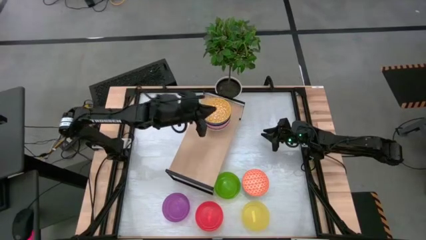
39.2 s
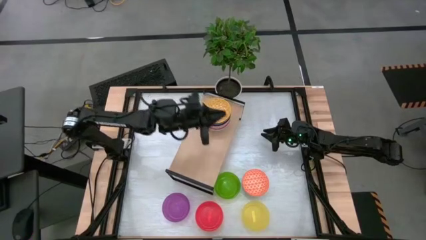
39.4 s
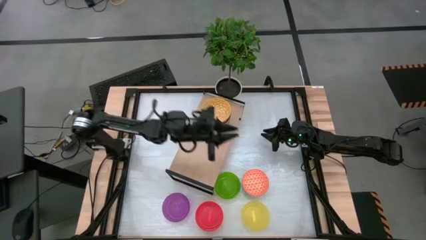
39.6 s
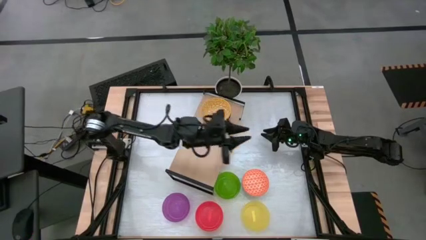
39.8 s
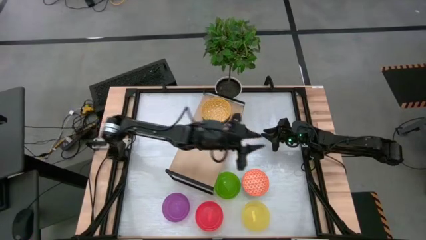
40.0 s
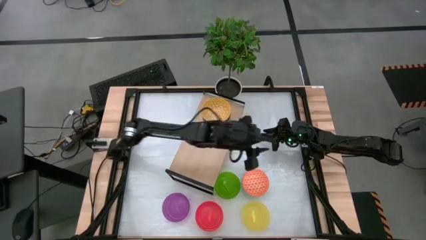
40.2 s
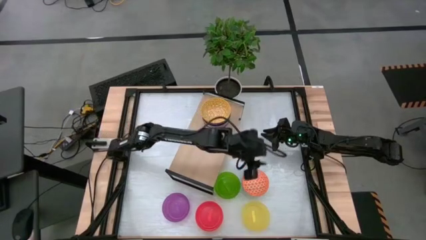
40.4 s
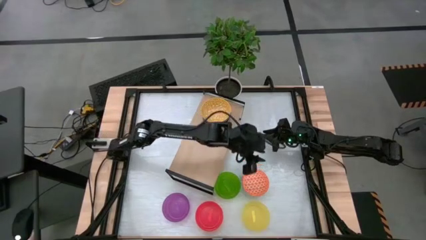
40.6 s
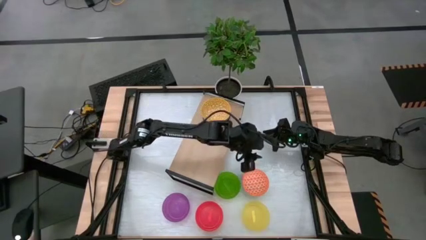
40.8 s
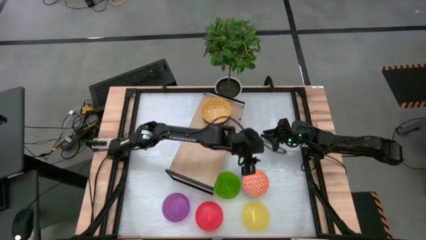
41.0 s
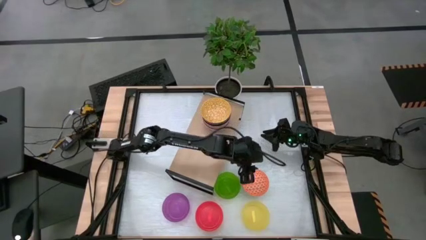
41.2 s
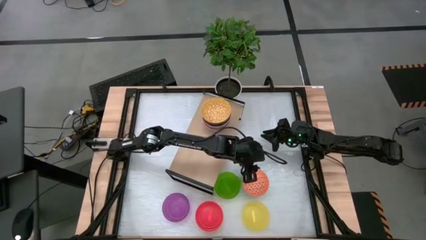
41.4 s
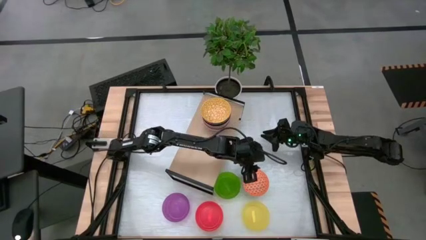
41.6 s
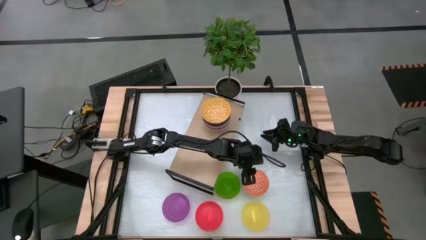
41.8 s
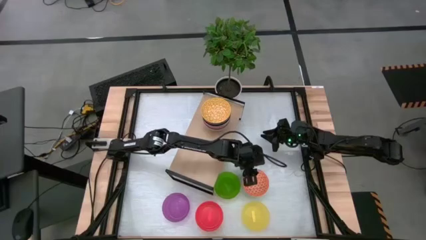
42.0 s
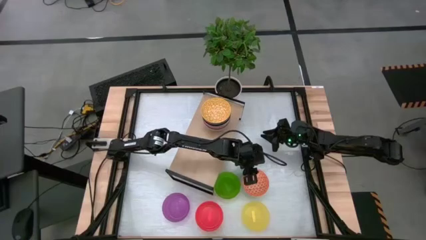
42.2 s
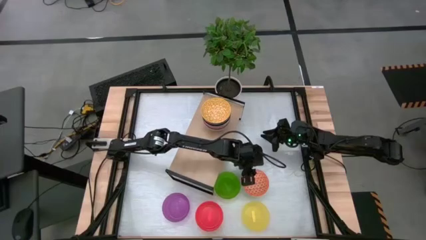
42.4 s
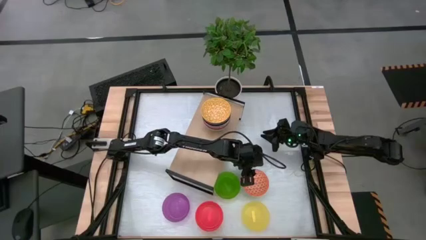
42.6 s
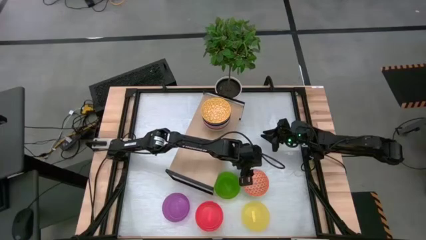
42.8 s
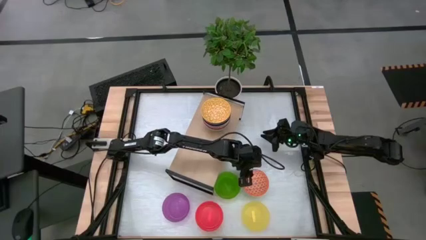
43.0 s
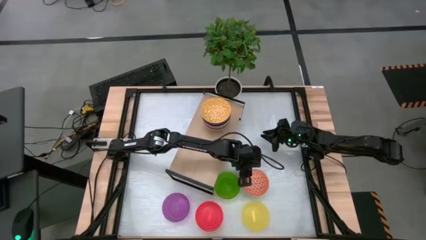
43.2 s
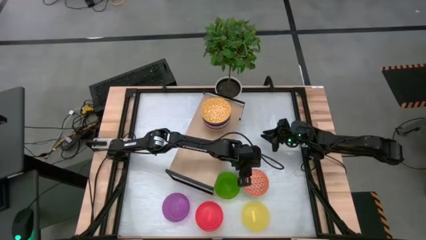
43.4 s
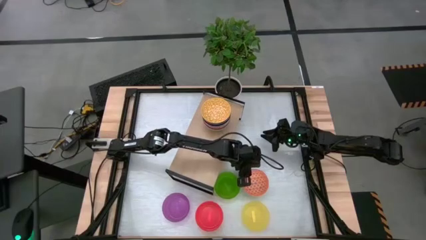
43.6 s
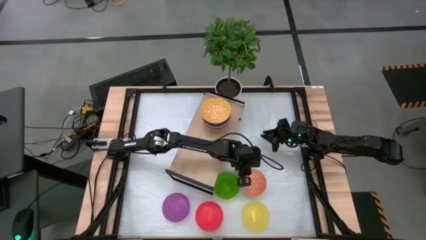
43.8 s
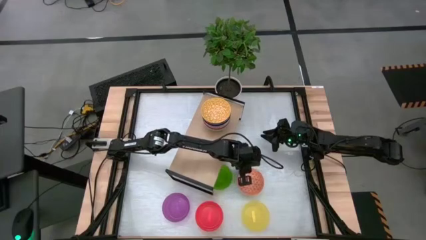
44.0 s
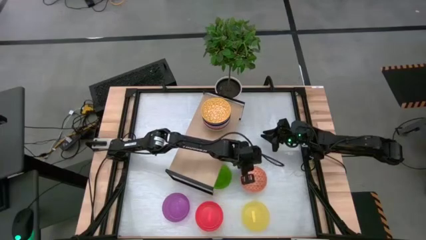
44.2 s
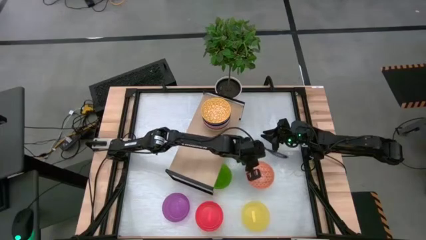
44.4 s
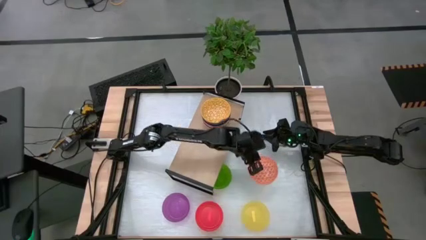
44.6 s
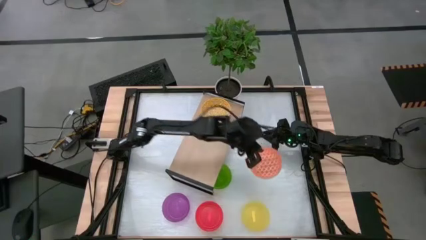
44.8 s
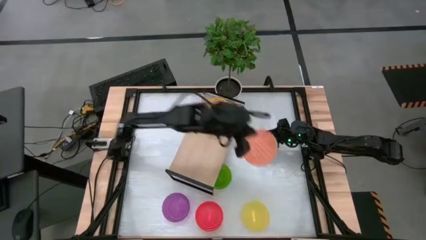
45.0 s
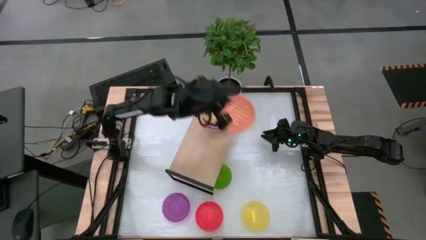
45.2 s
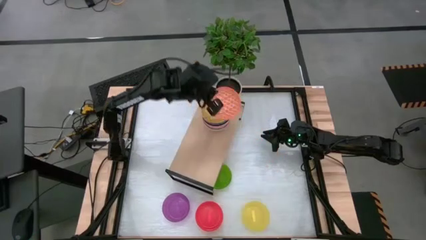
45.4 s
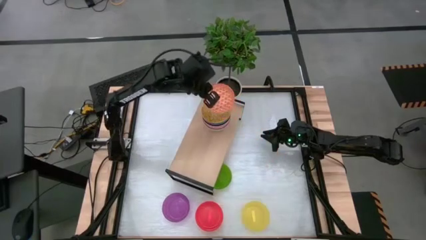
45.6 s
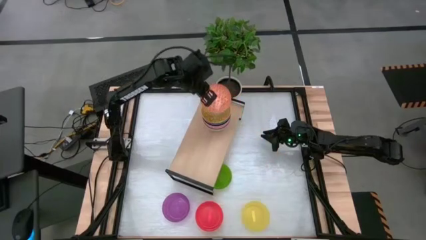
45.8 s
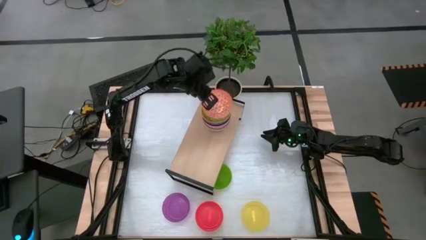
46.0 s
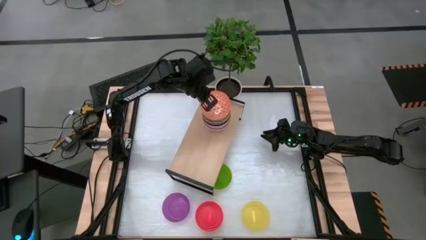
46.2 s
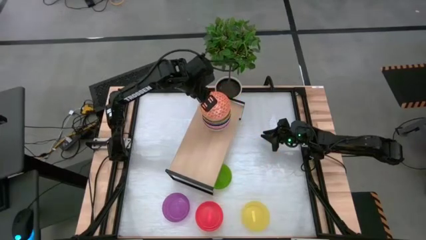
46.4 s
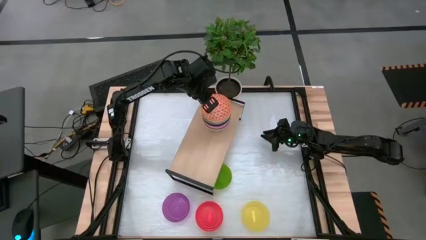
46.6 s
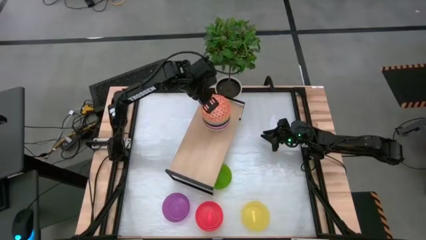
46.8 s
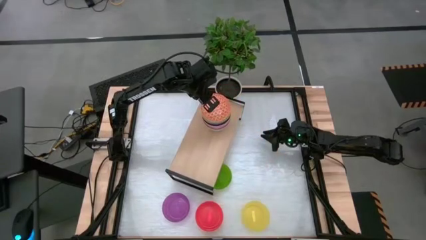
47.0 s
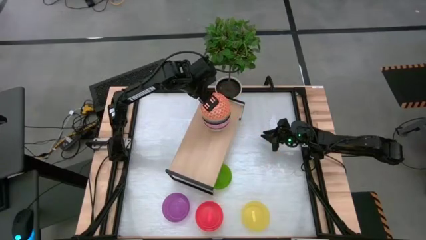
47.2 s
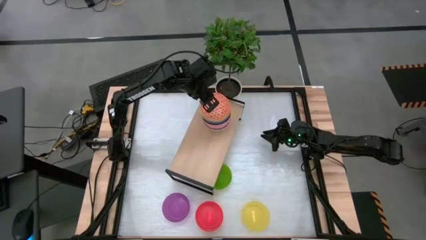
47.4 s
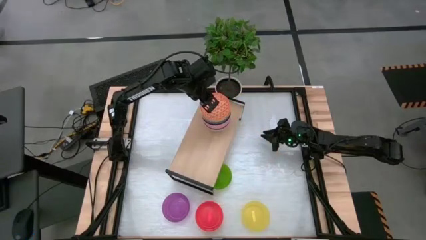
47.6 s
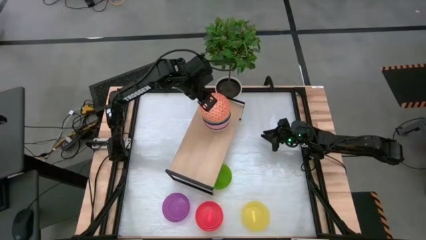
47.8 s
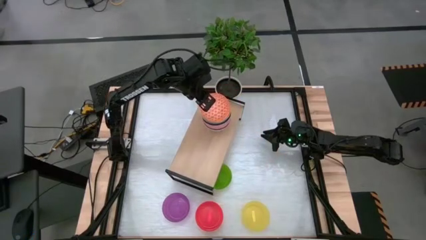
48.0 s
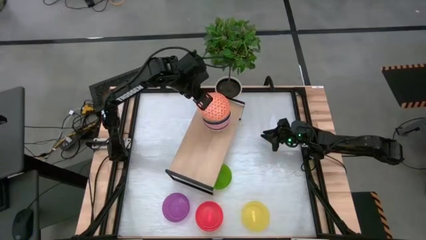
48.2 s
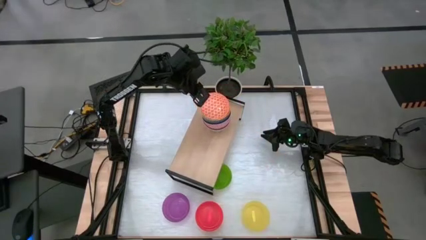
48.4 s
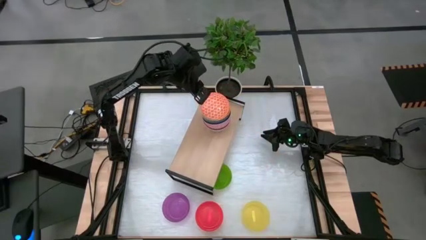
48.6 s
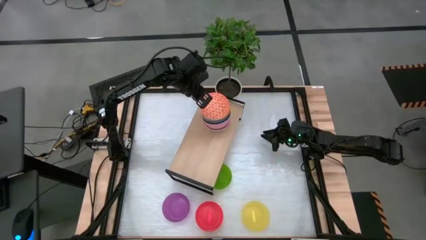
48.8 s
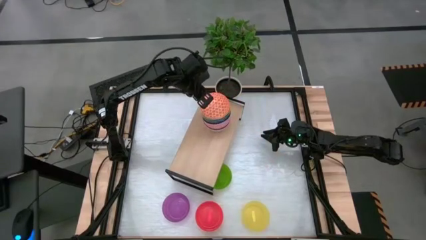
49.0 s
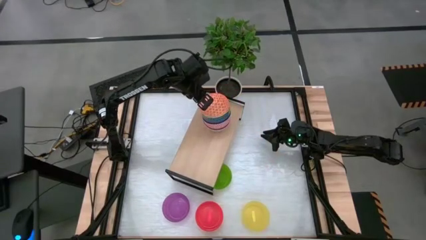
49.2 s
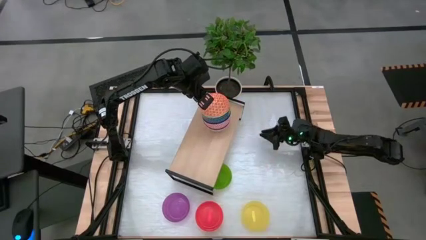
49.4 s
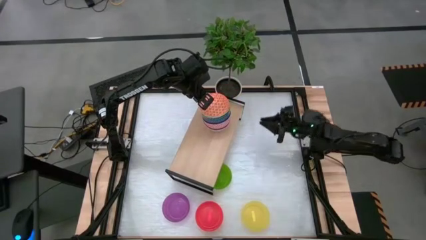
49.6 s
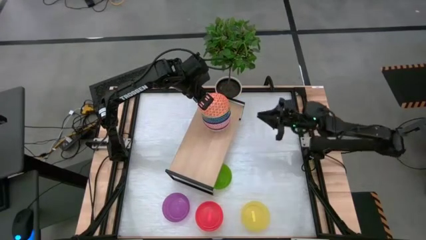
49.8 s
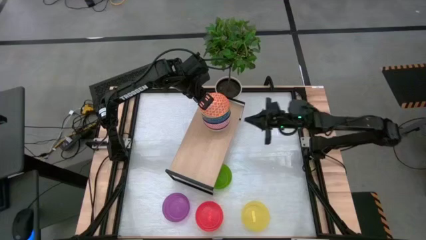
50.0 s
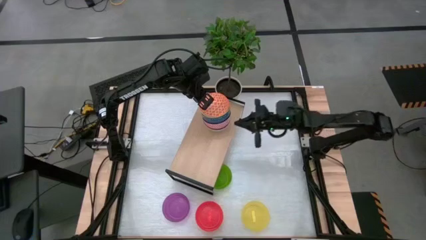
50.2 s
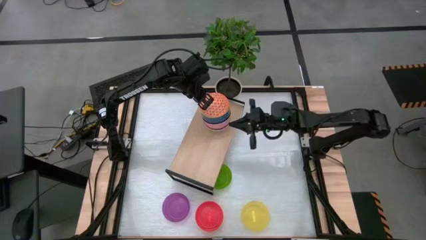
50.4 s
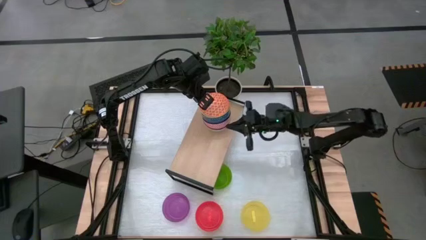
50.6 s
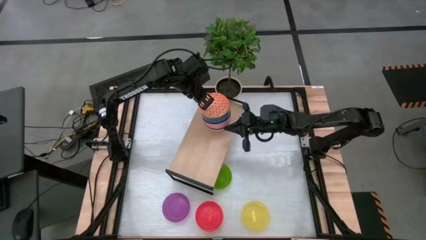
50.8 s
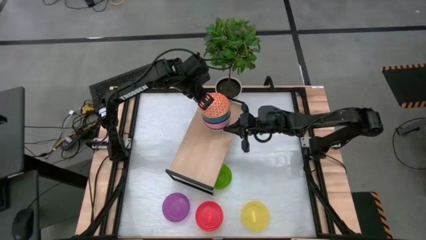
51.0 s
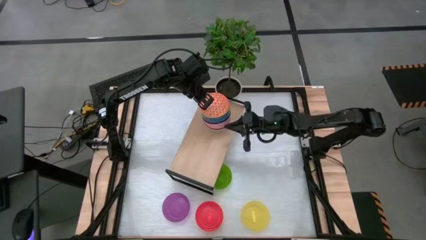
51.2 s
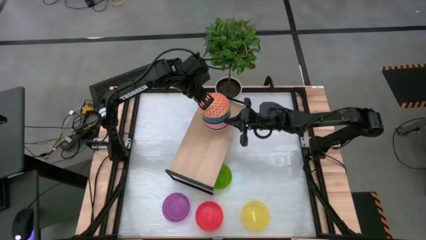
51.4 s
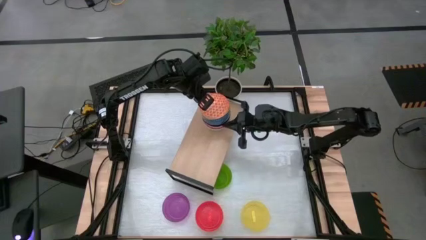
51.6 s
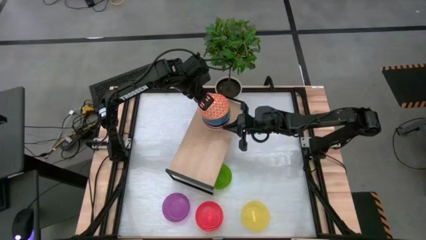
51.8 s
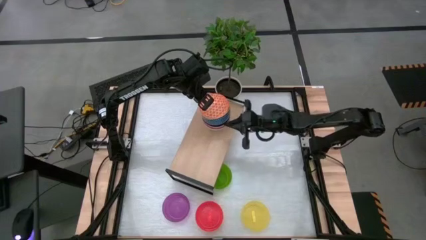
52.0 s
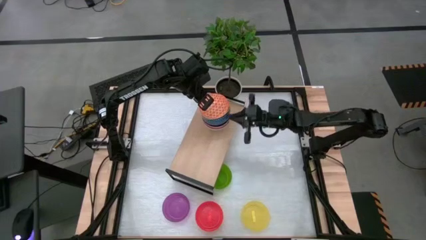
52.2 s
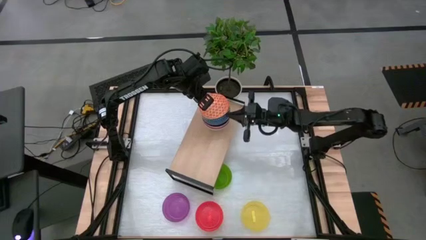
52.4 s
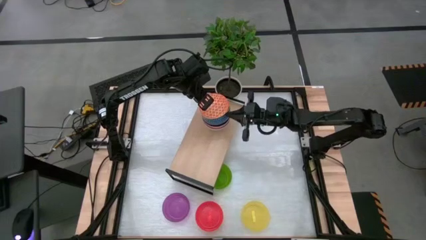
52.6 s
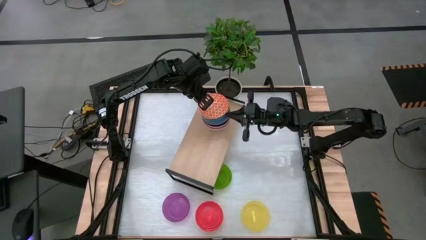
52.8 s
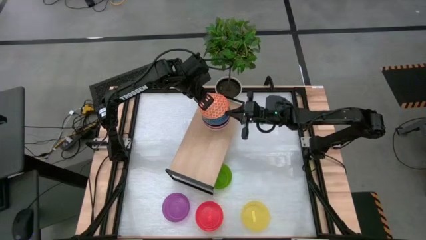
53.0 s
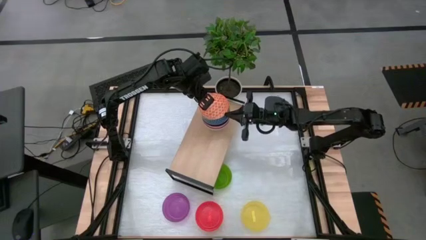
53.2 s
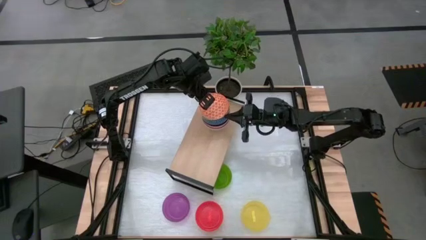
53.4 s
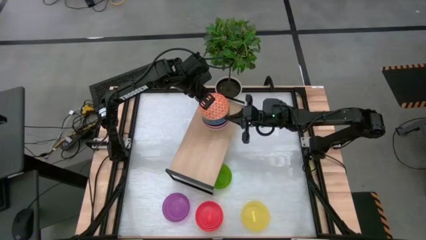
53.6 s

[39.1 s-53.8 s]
Task: Place and stack bowls onto a shelf
Stack the orange patterned bowl on top of the yellow patterned bowl on the shelf

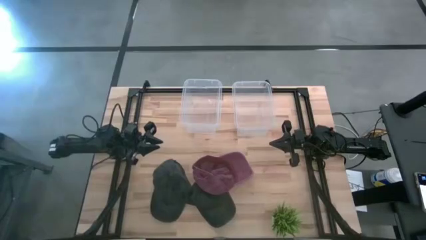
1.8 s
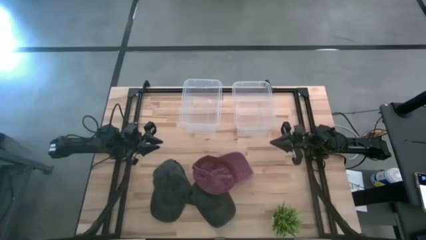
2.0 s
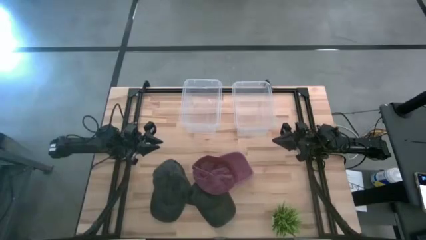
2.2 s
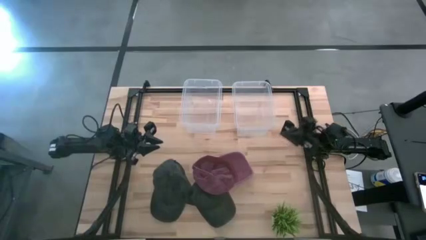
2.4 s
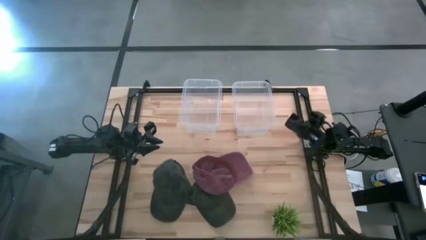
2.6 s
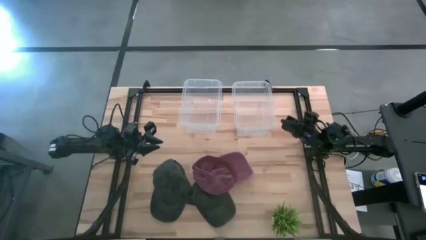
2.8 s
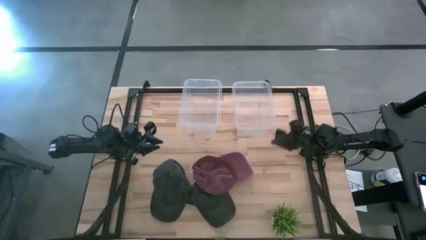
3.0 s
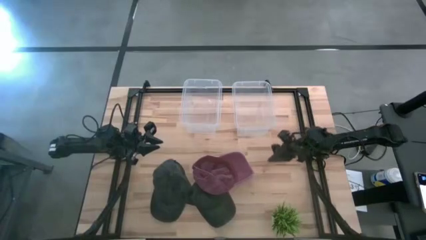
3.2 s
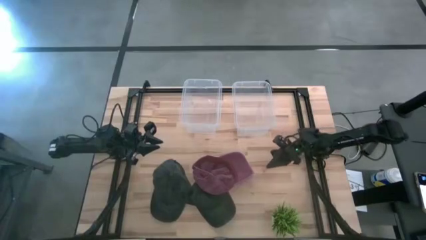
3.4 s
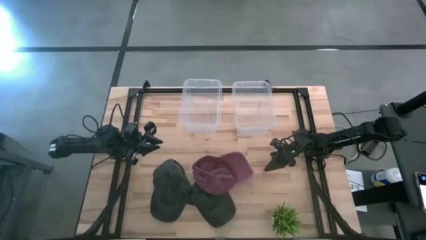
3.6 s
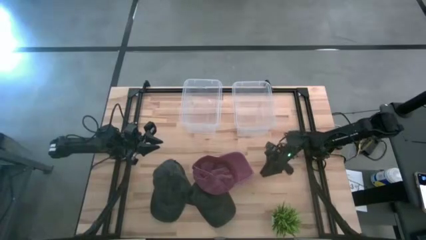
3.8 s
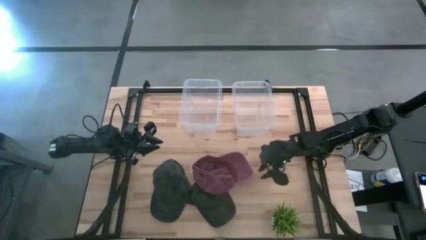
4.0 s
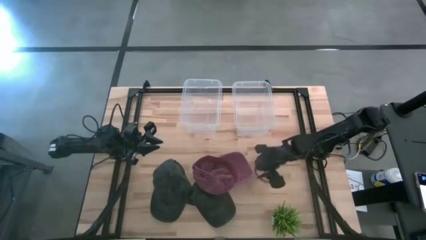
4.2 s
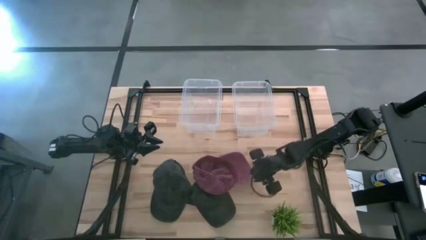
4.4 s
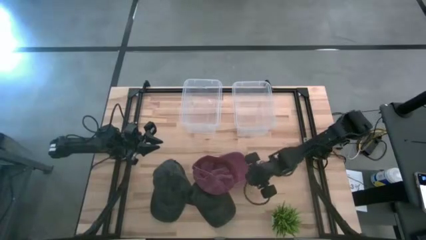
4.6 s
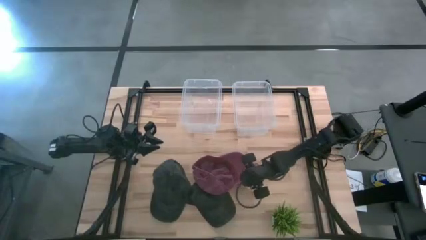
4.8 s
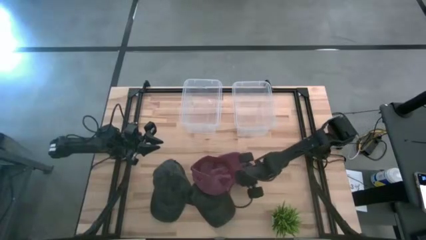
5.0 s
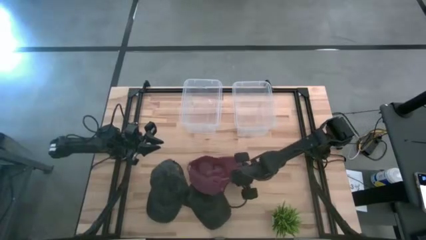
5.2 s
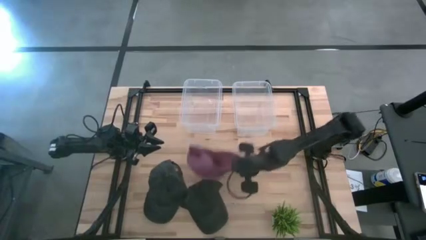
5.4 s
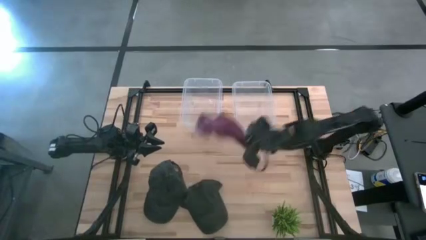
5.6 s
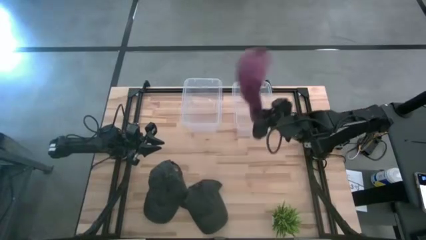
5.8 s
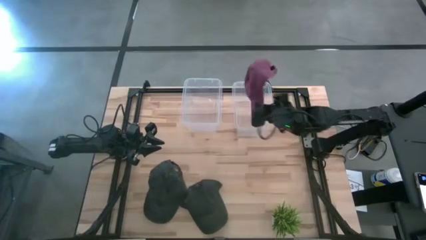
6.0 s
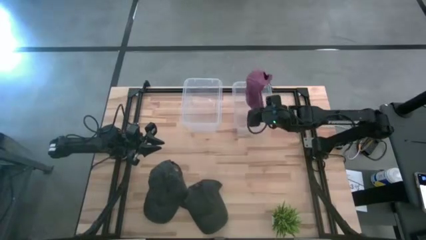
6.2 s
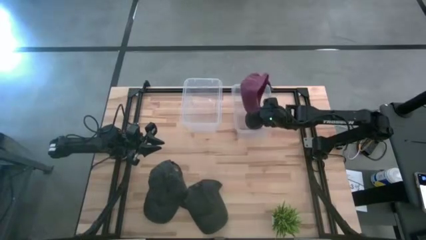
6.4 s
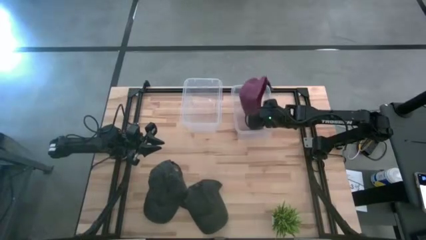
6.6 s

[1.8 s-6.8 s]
Task: Pick & Place hat
Put the red cap into the right transparent bin
